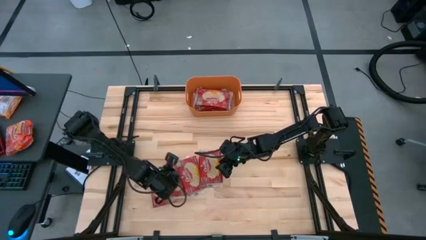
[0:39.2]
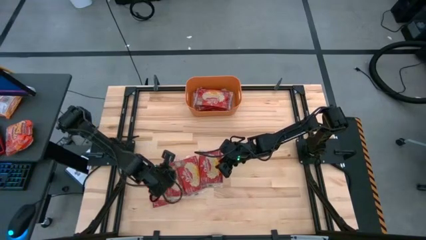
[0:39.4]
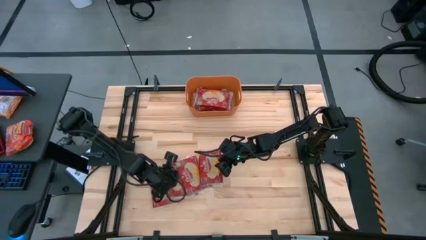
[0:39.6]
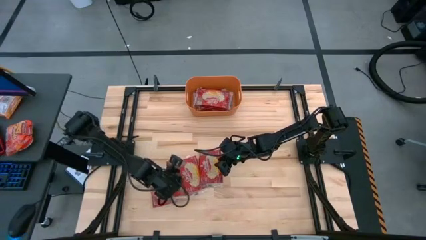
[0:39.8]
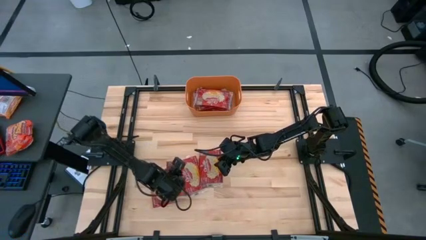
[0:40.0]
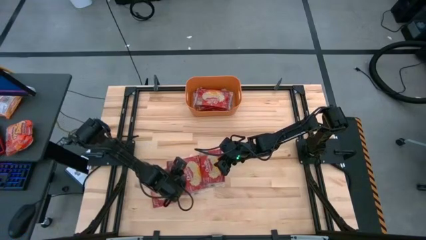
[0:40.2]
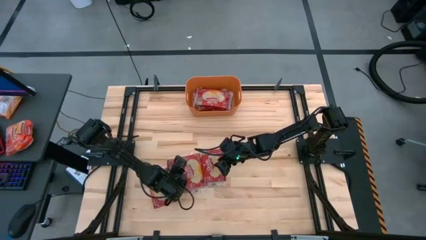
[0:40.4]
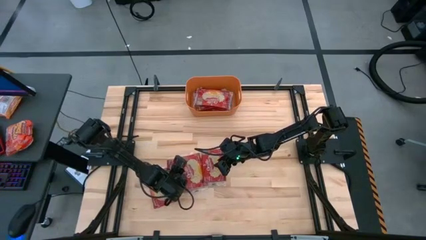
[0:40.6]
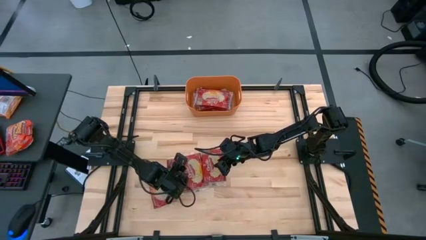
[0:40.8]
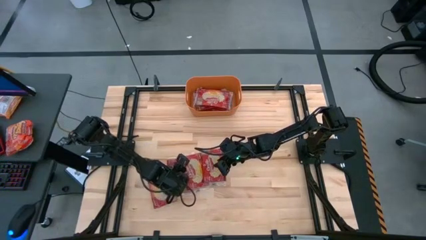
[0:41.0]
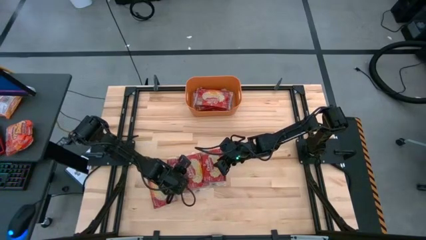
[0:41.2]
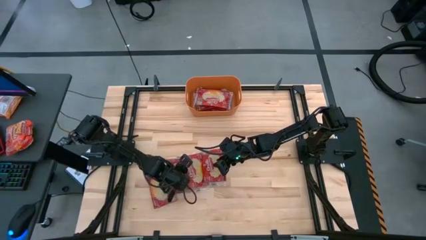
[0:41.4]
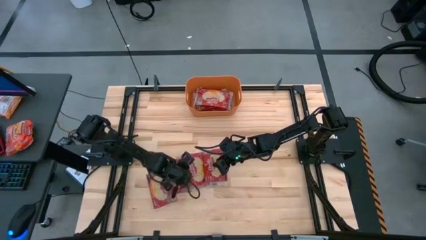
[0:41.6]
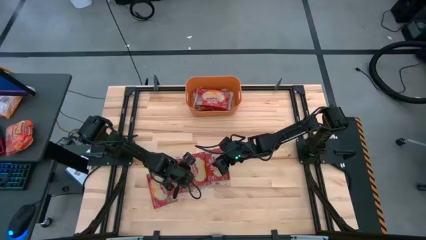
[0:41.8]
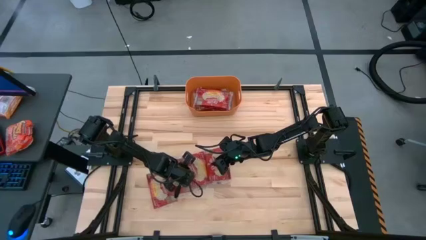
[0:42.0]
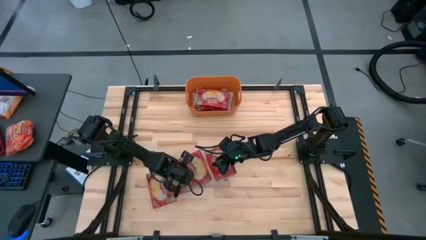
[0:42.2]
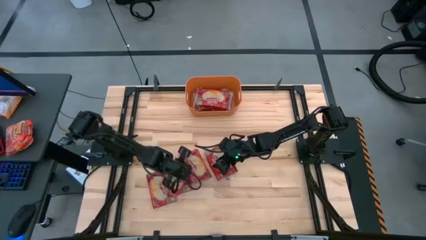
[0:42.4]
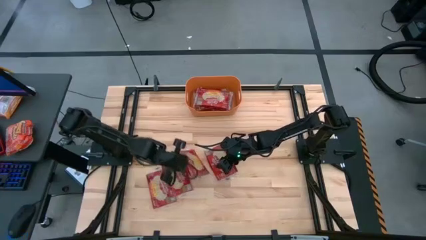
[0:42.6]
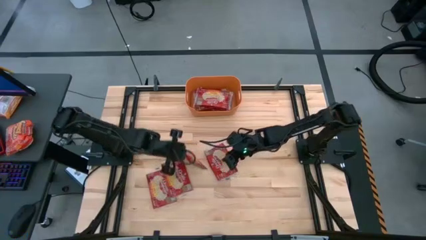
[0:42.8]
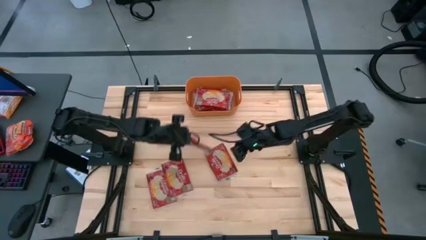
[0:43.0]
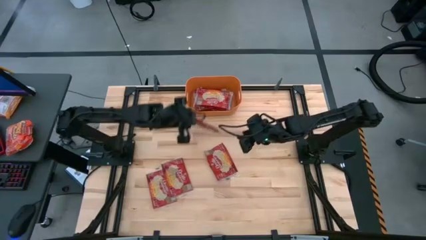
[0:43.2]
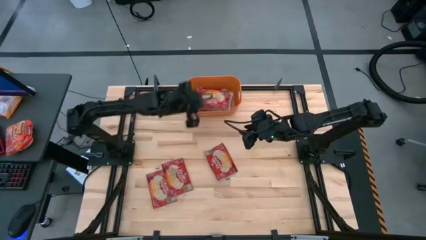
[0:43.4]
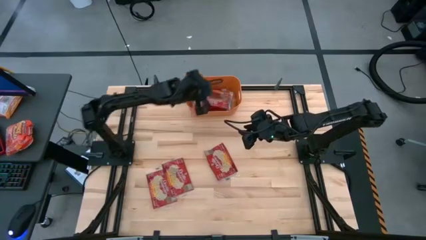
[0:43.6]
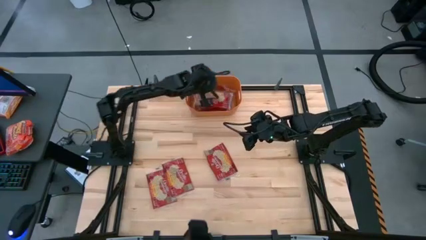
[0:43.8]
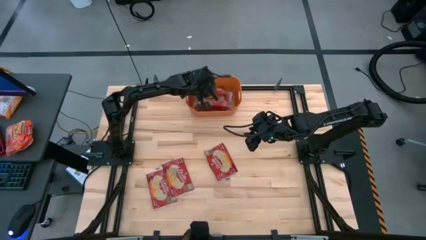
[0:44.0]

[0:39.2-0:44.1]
Task: Sort popcorn bags into baskets
Put the red popcorn bag into the orange bin

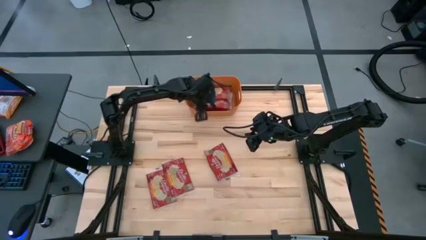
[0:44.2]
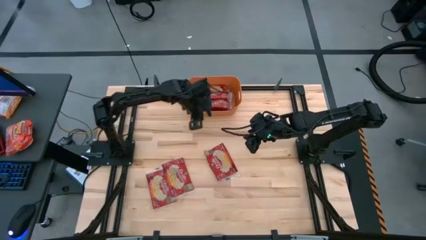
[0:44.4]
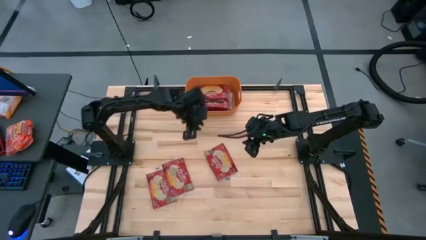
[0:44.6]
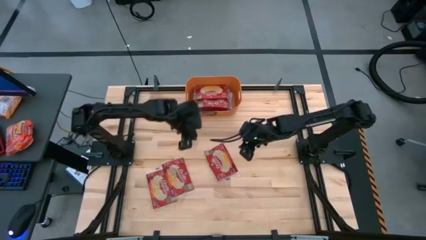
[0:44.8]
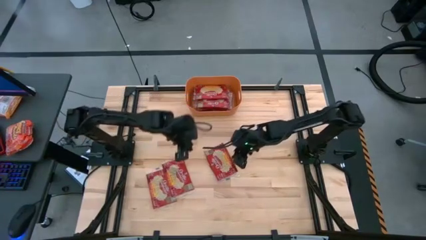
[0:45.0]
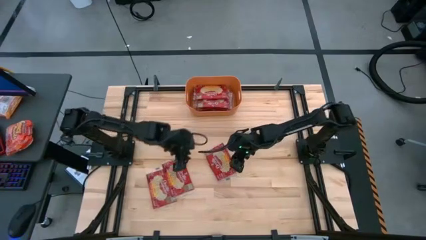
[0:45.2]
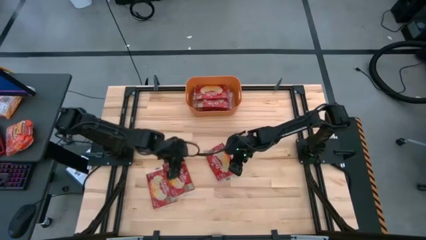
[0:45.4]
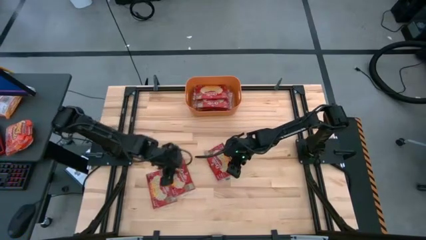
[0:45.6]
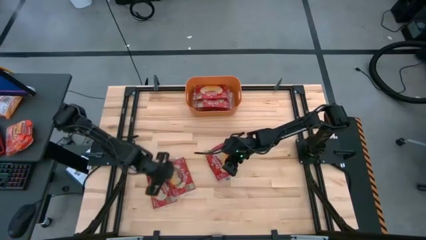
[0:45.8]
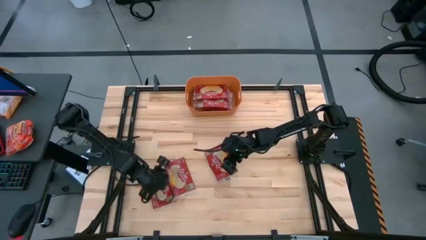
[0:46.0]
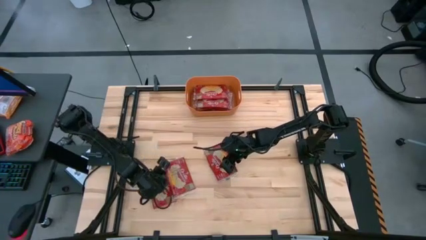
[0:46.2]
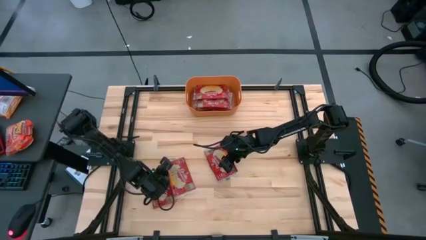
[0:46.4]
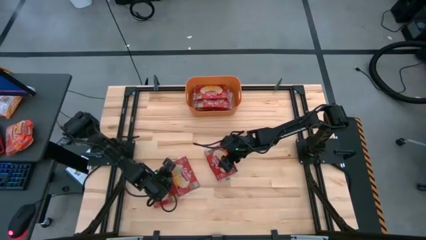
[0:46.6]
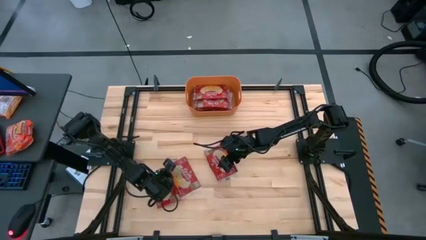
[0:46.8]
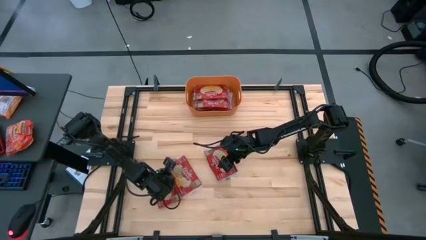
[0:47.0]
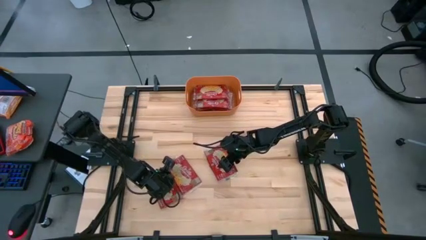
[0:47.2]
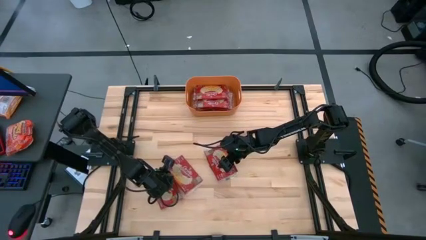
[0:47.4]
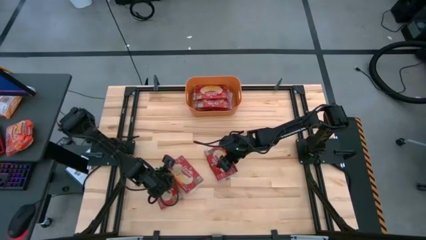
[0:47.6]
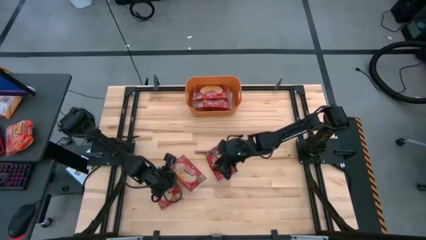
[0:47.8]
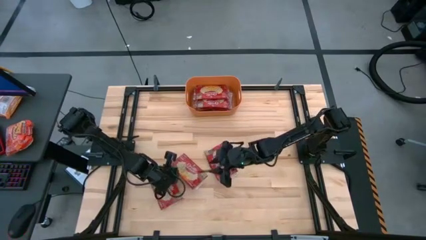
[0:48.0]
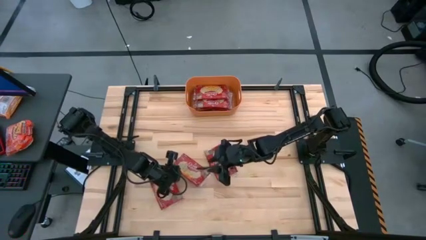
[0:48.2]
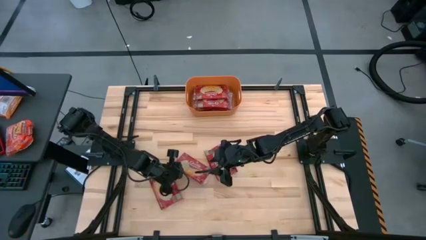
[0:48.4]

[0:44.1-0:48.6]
Put the red popcorn bag into the orange bin

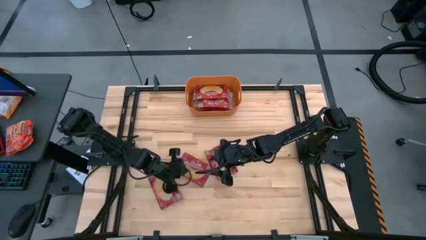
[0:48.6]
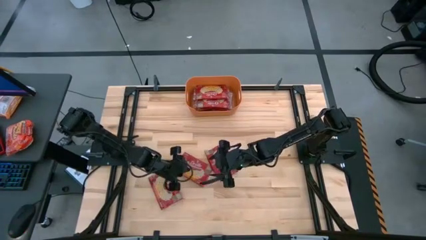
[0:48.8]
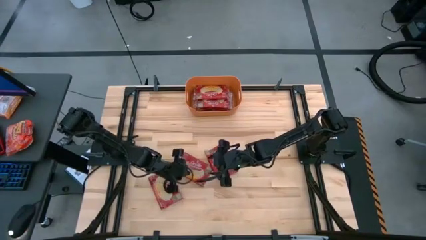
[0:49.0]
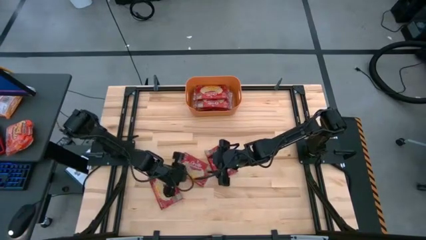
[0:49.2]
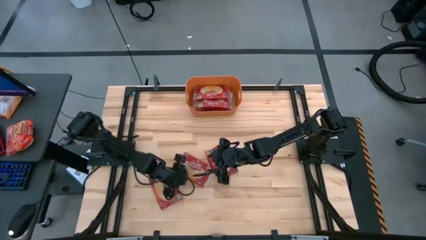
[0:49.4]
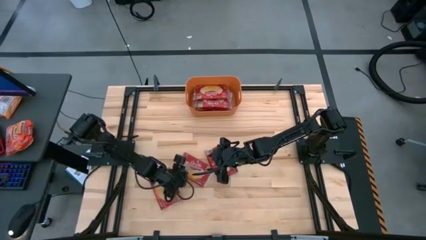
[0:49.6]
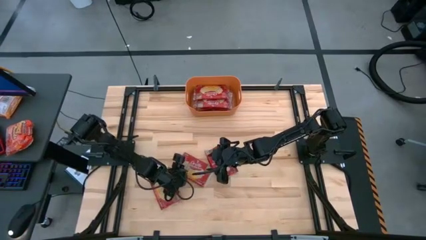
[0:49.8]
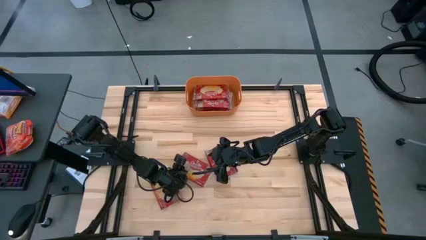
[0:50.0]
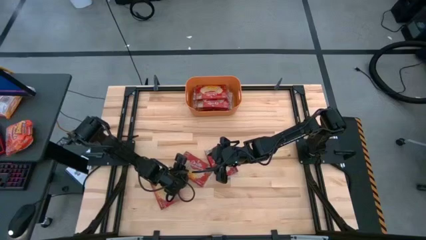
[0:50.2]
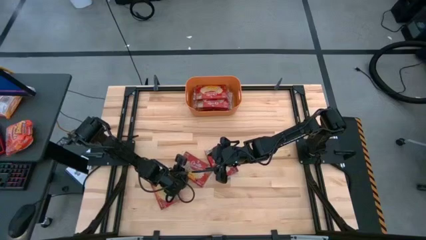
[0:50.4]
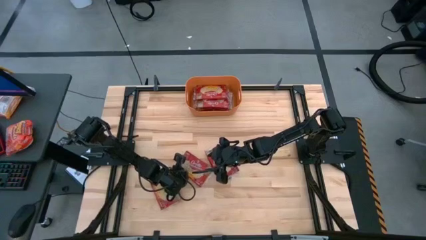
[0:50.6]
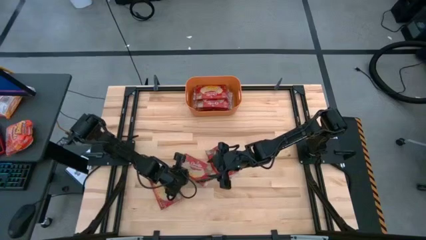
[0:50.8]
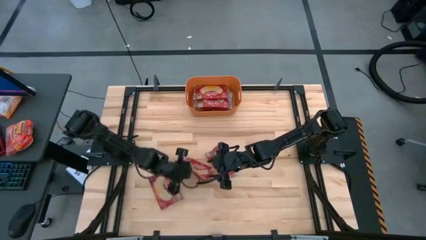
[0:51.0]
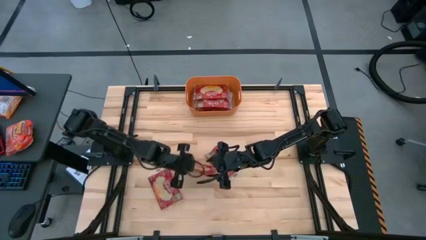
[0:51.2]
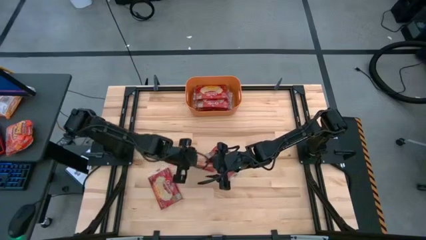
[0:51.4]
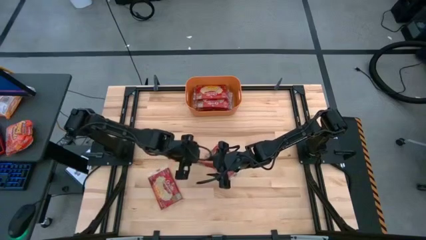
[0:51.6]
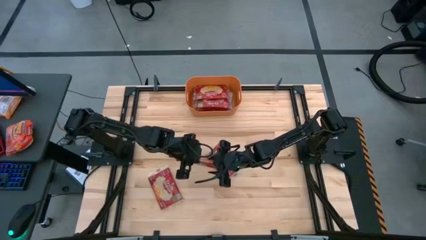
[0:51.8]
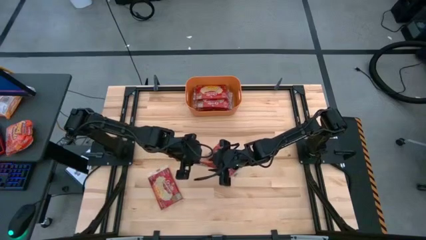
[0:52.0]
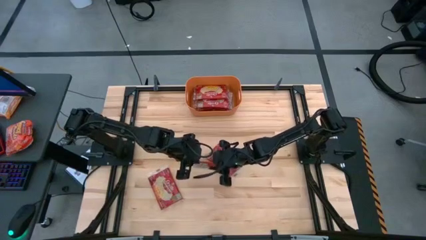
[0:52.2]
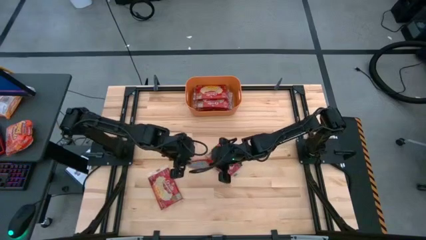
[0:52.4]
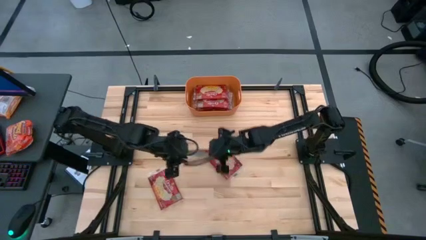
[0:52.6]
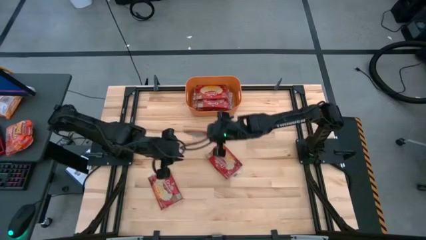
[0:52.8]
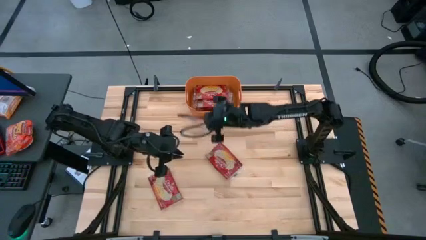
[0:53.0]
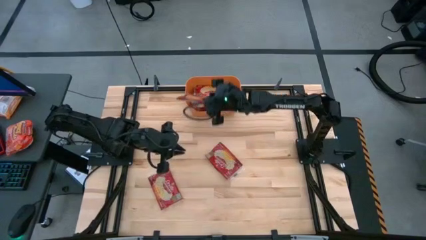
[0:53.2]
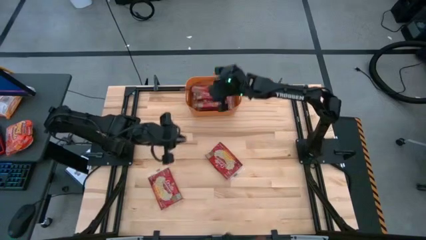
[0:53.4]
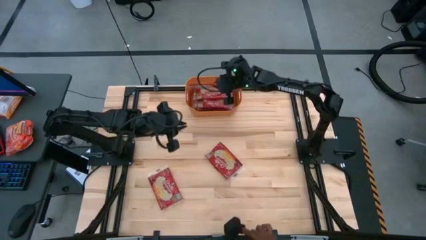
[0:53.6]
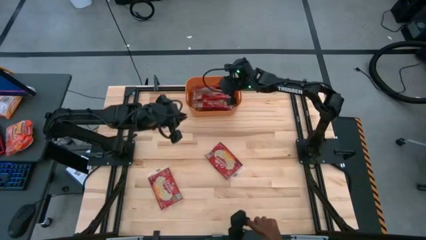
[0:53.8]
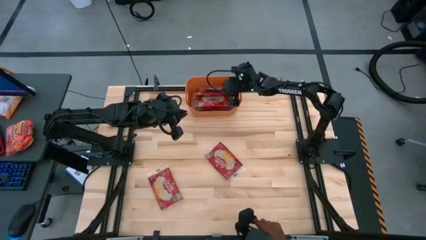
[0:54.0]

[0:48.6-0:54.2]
Put the red popcorn bag into the orange bin

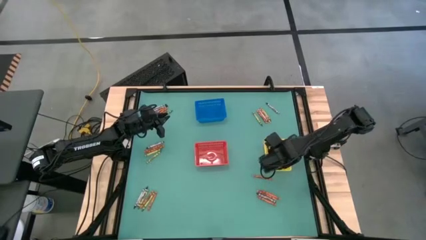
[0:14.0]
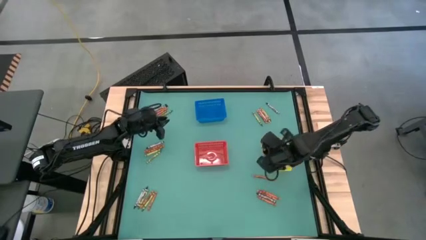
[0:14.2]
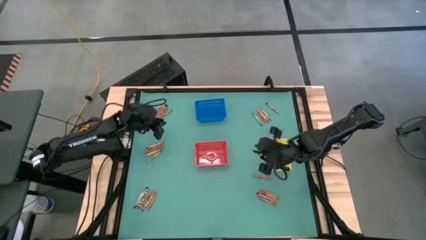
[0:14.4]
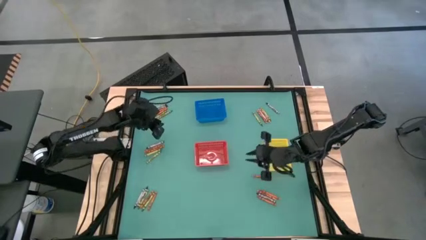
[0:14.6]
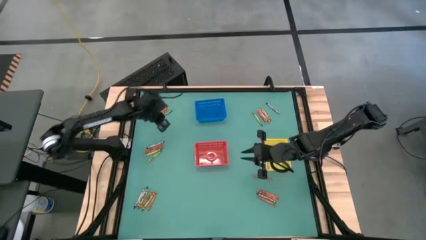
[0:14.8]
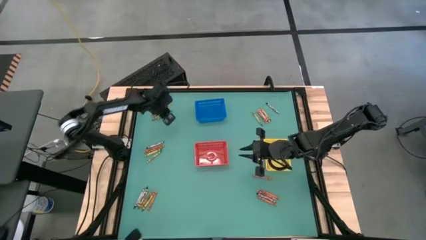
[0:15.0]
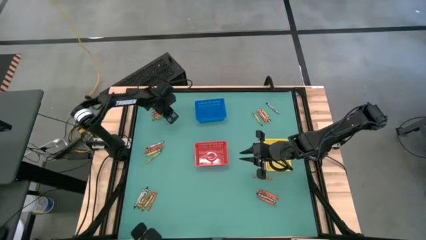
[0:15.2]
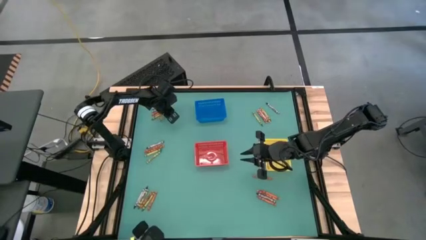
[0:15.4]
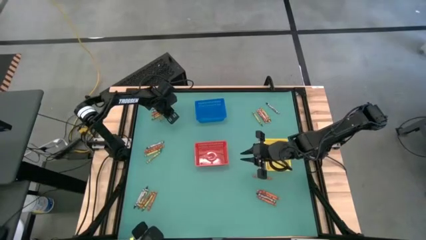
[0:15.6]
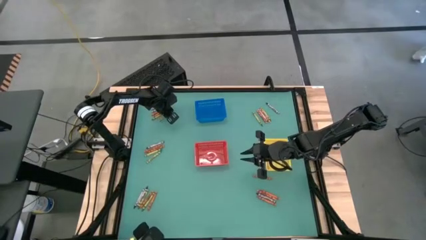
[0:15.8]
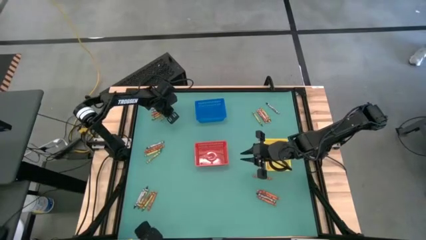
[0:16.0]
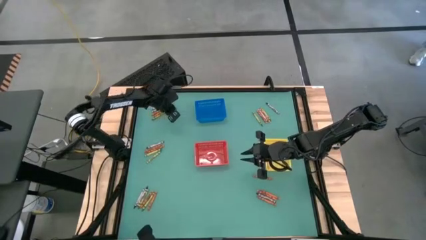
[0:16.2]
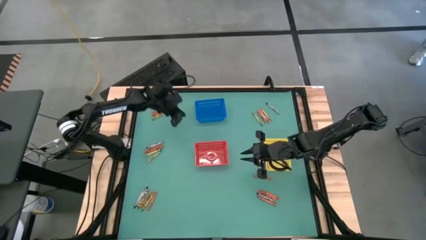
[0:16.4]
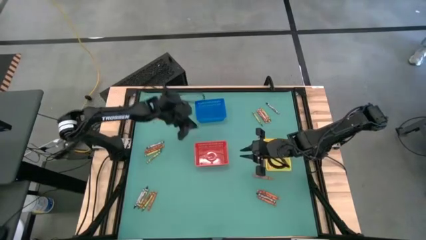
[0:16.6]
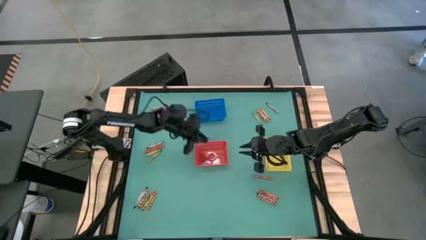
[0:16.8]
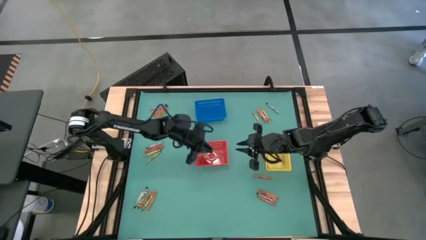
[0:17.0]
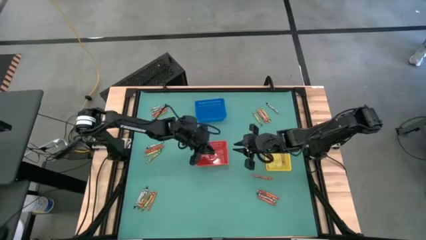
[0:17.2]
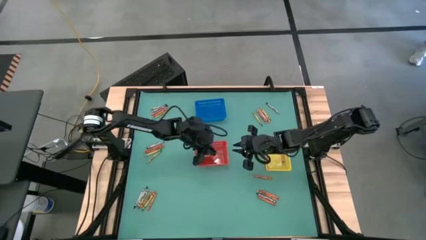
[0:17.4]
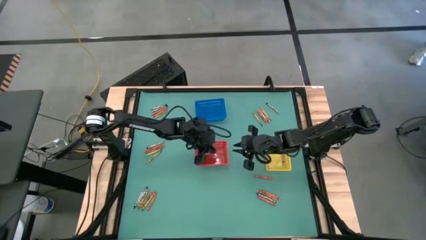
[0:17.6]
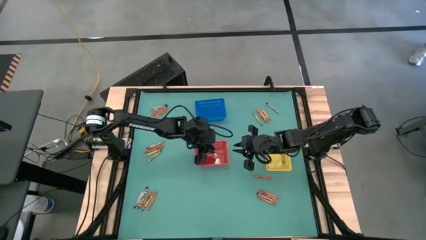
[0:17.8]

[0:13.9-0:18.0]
Task: Sort crayons
Put the green crayon into the red bin
